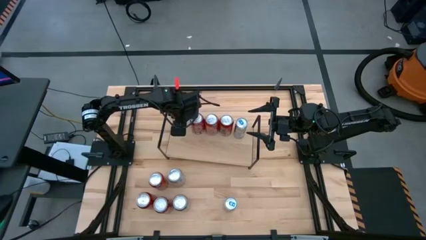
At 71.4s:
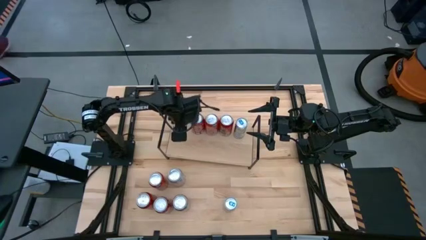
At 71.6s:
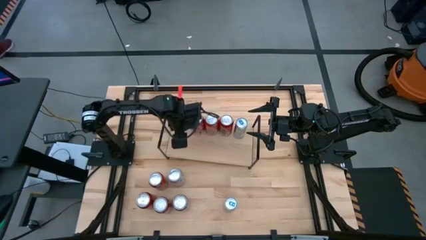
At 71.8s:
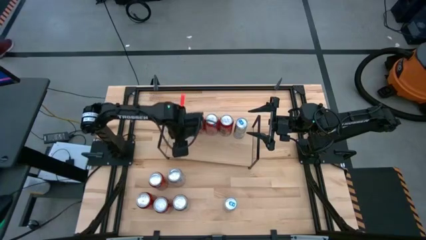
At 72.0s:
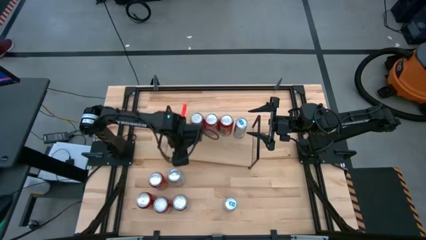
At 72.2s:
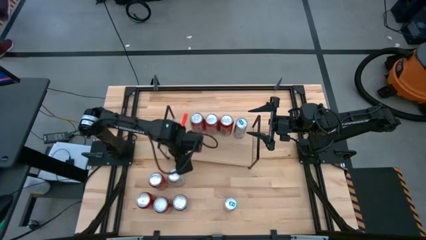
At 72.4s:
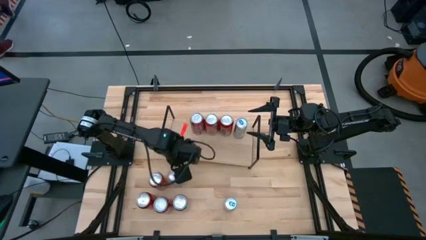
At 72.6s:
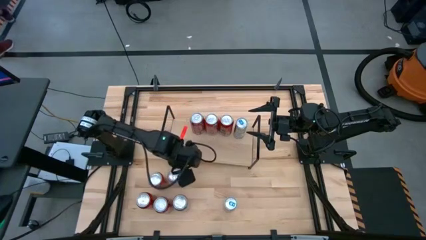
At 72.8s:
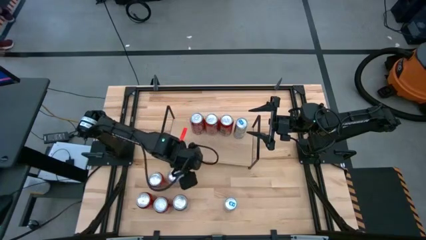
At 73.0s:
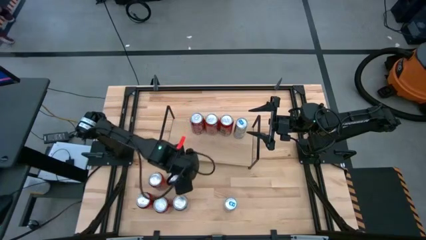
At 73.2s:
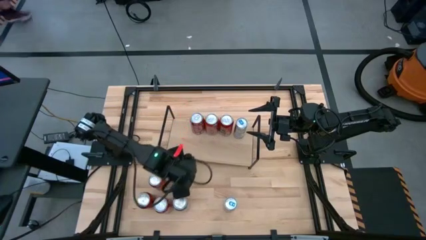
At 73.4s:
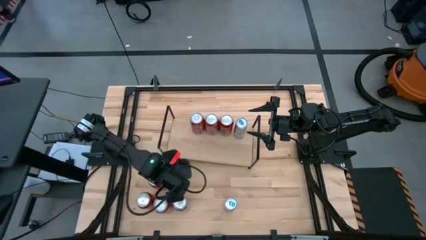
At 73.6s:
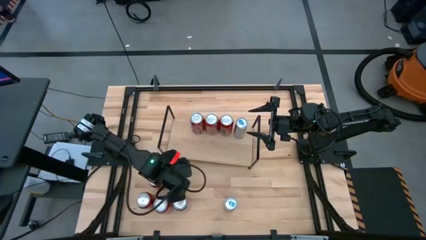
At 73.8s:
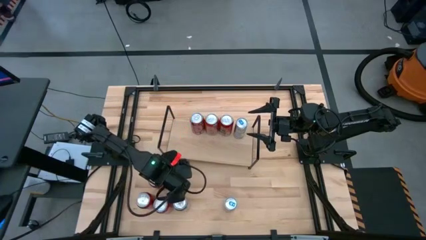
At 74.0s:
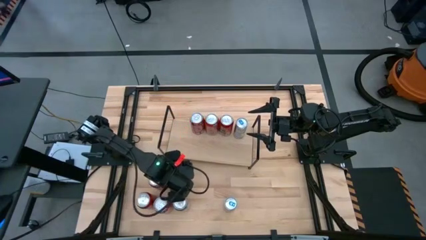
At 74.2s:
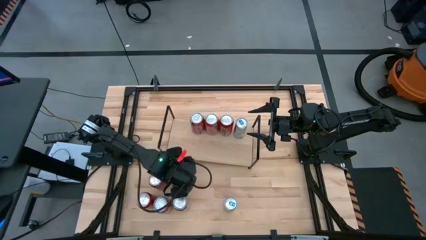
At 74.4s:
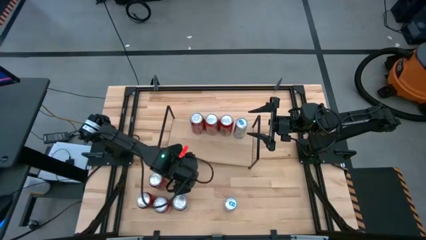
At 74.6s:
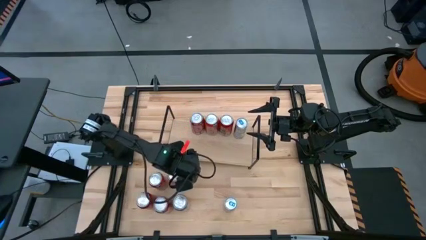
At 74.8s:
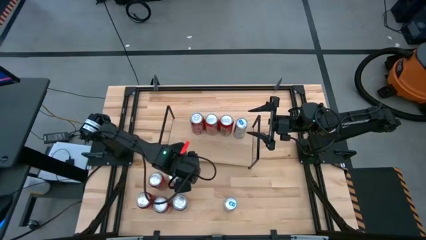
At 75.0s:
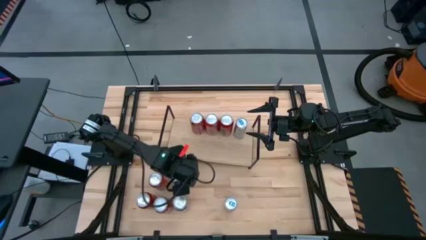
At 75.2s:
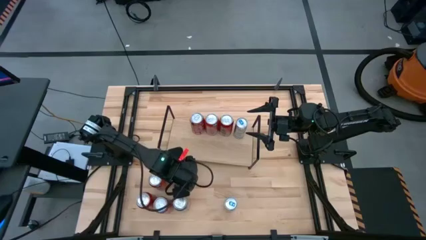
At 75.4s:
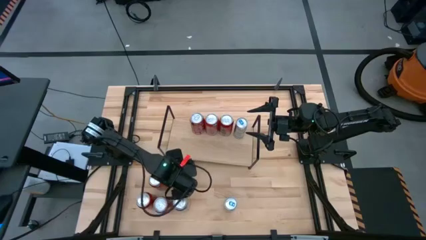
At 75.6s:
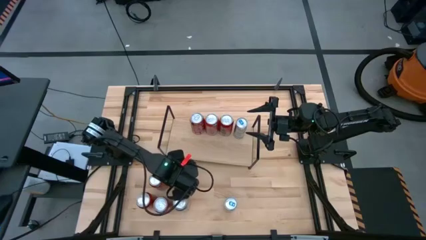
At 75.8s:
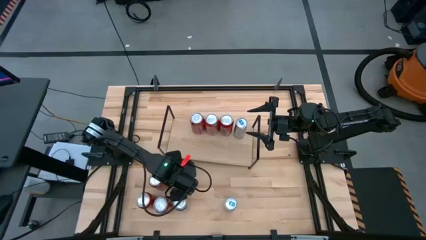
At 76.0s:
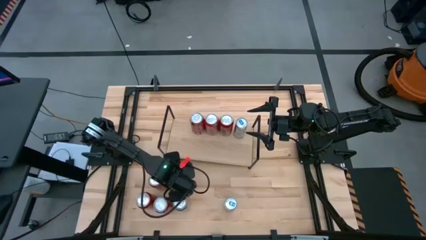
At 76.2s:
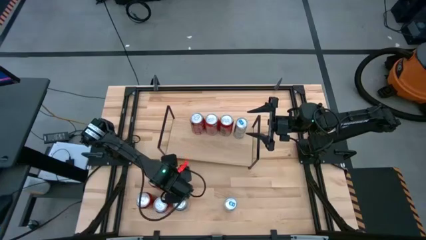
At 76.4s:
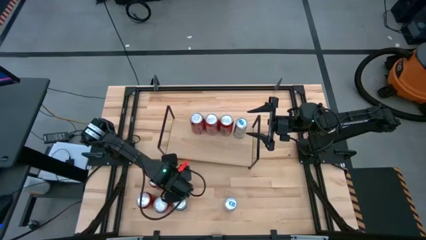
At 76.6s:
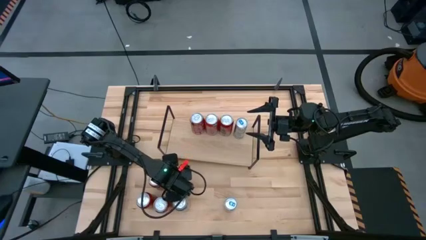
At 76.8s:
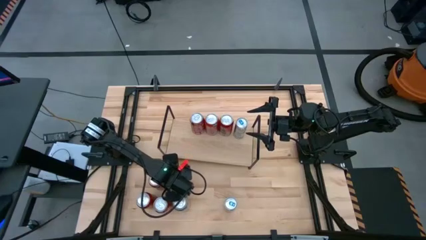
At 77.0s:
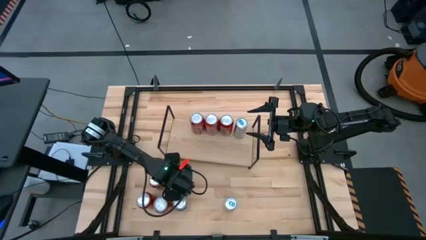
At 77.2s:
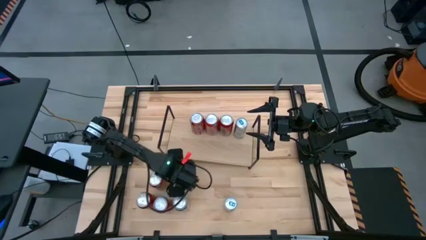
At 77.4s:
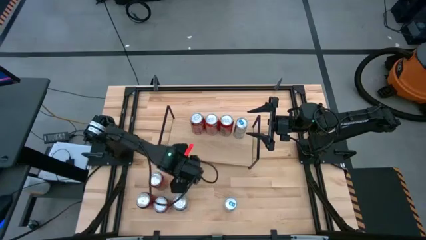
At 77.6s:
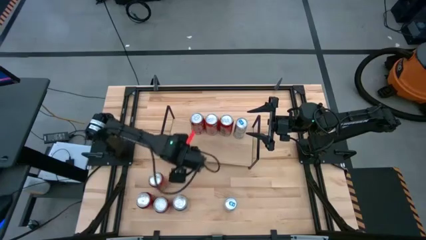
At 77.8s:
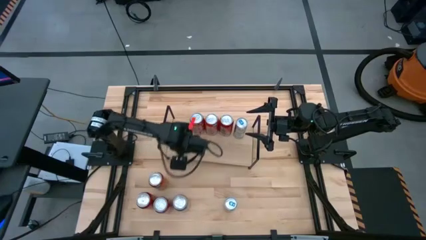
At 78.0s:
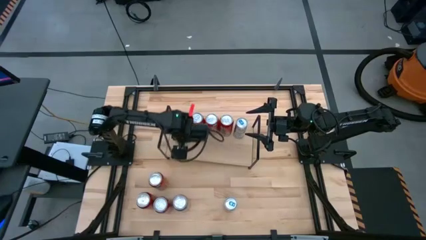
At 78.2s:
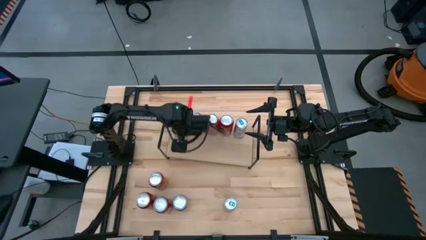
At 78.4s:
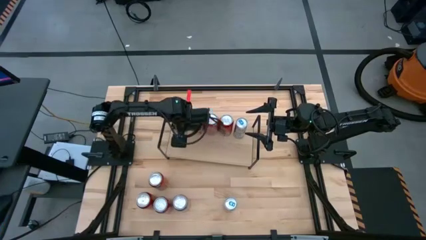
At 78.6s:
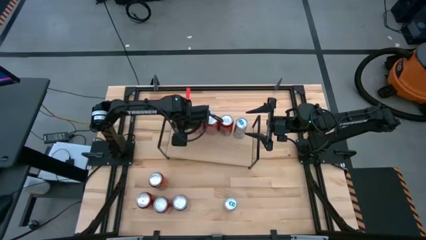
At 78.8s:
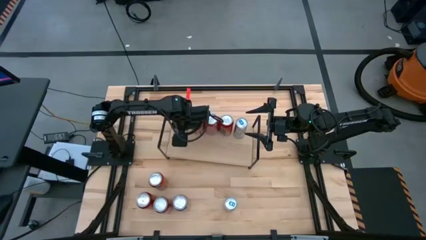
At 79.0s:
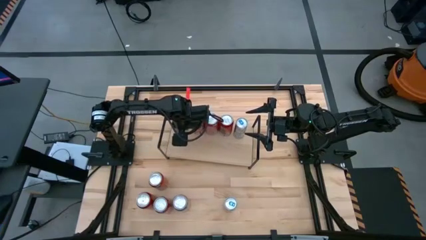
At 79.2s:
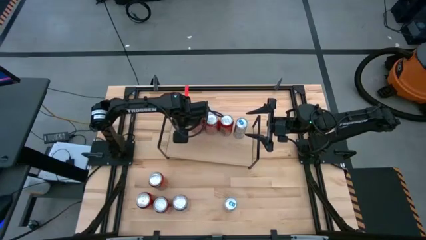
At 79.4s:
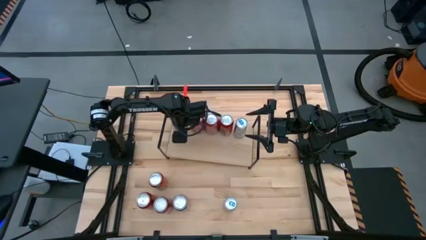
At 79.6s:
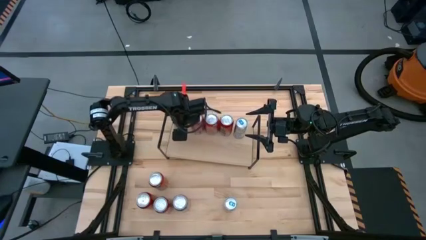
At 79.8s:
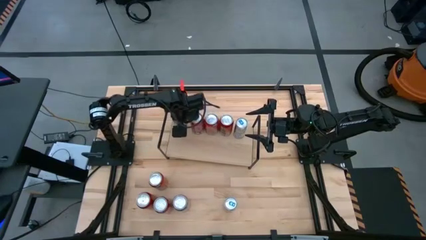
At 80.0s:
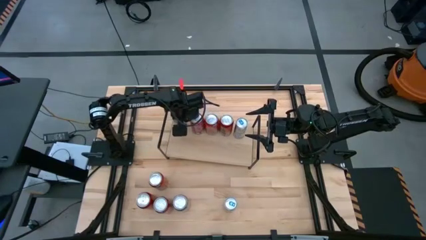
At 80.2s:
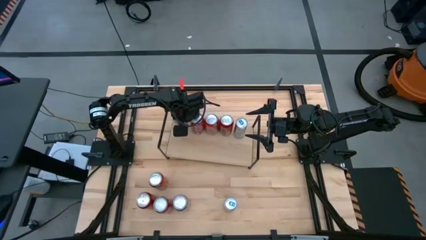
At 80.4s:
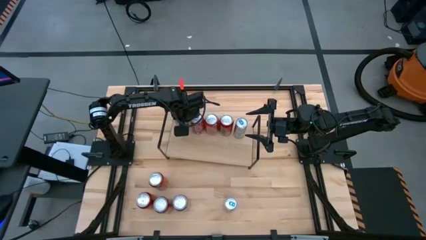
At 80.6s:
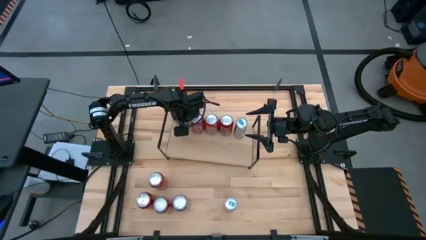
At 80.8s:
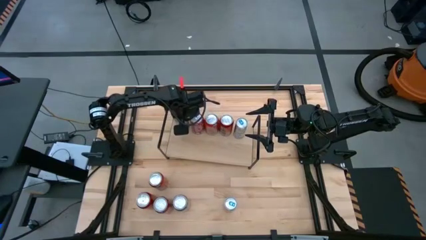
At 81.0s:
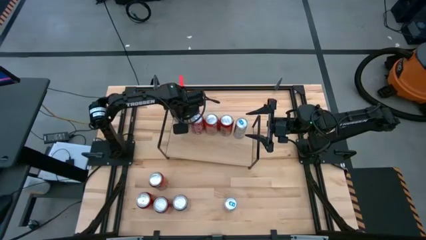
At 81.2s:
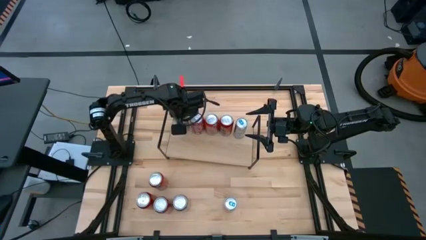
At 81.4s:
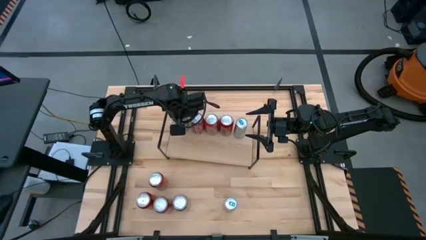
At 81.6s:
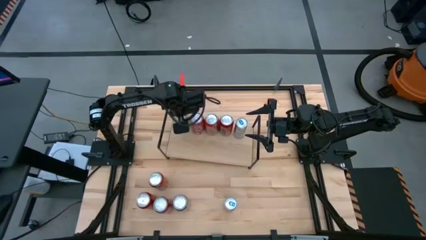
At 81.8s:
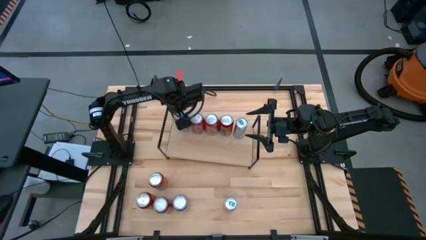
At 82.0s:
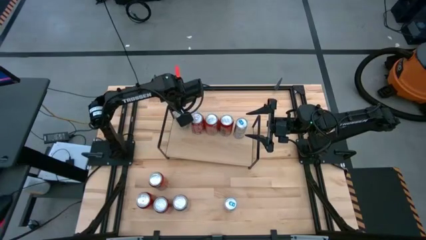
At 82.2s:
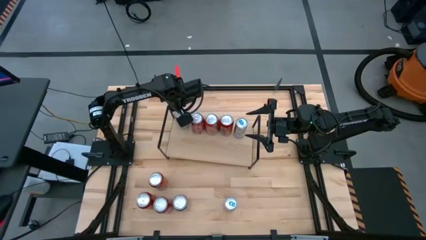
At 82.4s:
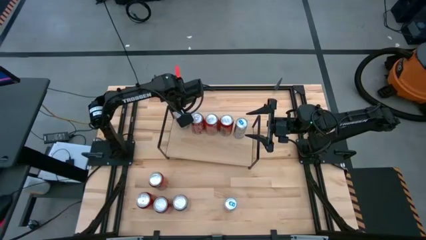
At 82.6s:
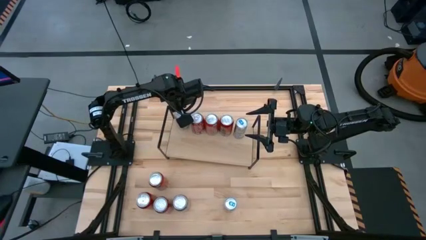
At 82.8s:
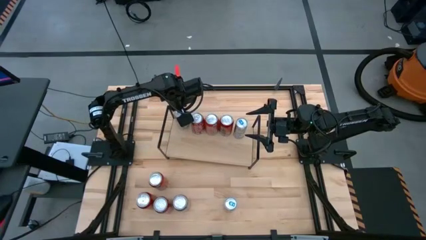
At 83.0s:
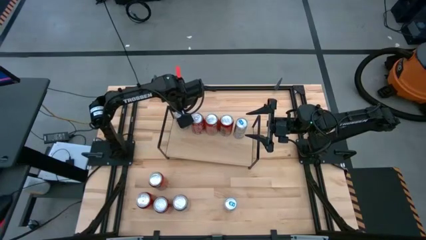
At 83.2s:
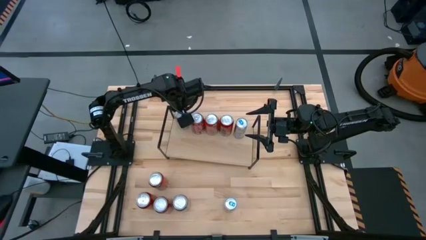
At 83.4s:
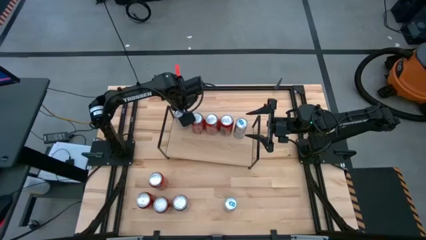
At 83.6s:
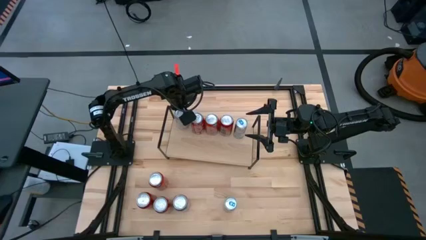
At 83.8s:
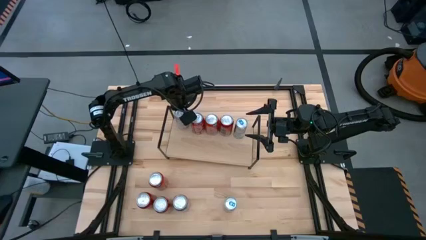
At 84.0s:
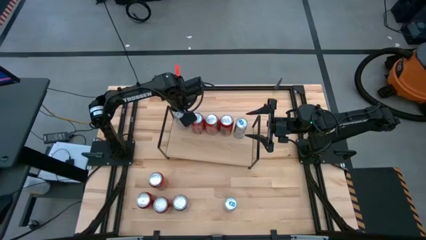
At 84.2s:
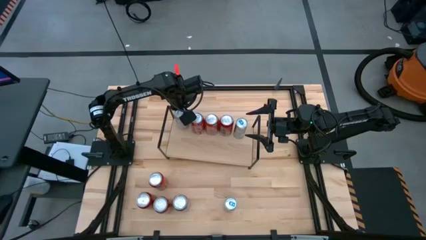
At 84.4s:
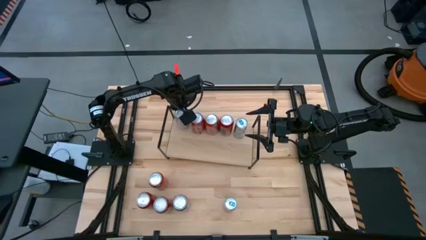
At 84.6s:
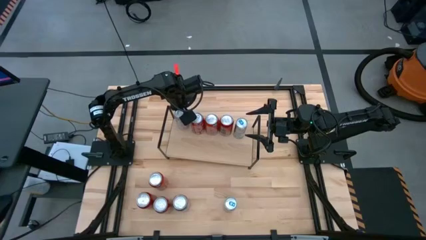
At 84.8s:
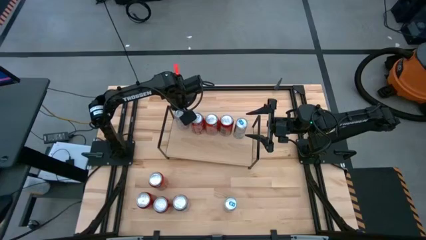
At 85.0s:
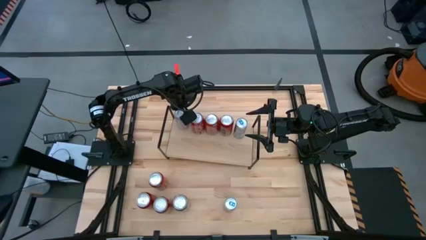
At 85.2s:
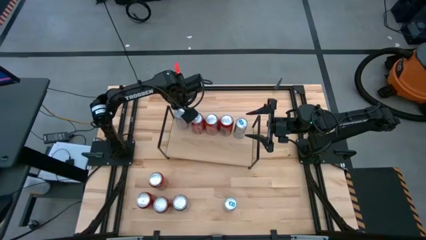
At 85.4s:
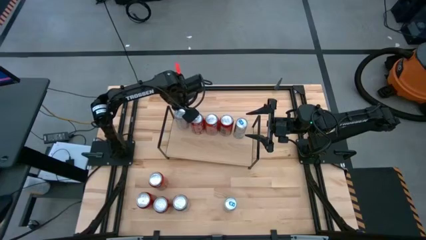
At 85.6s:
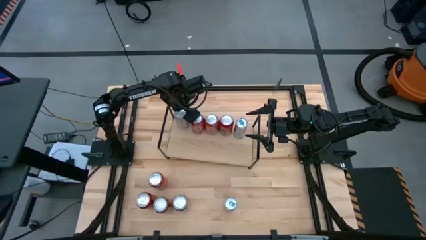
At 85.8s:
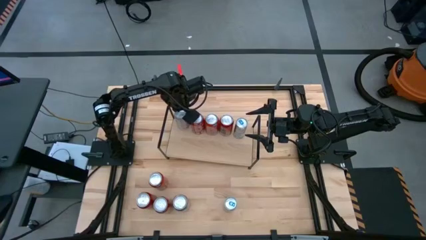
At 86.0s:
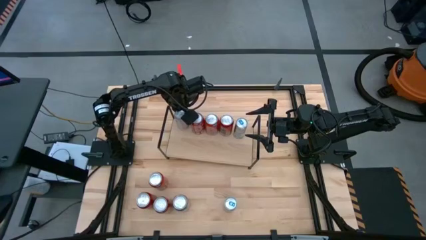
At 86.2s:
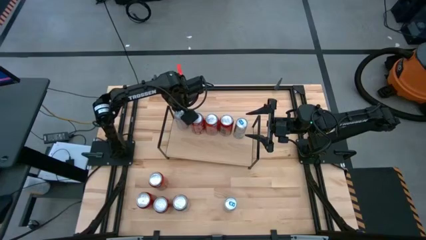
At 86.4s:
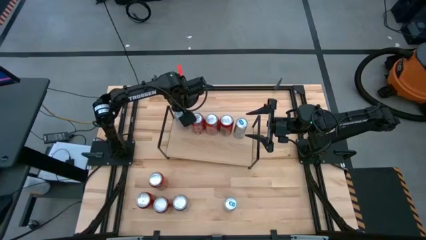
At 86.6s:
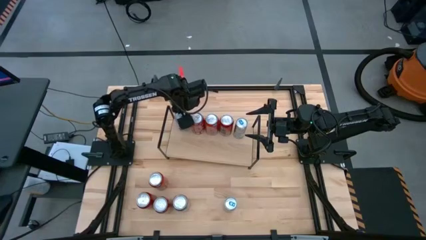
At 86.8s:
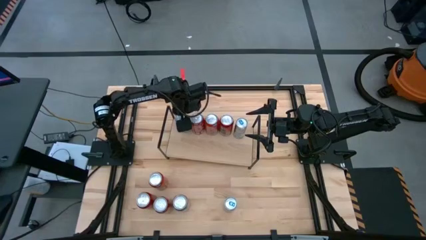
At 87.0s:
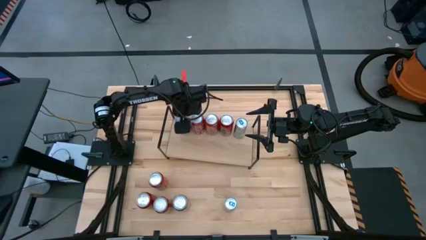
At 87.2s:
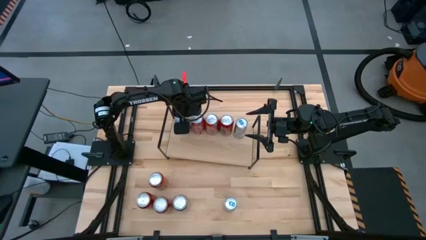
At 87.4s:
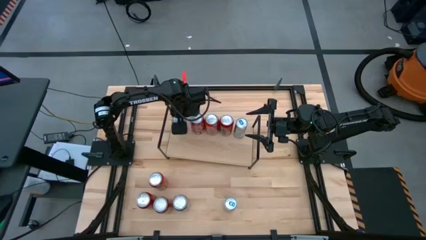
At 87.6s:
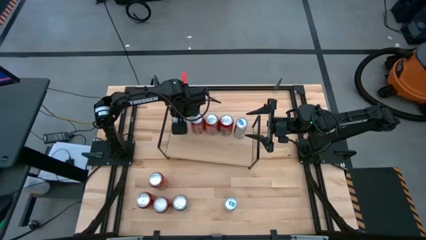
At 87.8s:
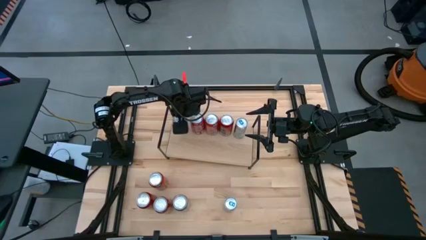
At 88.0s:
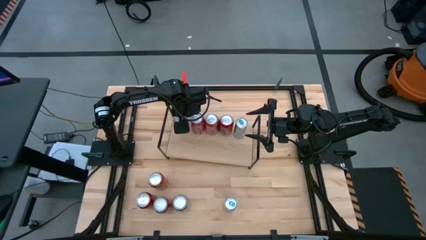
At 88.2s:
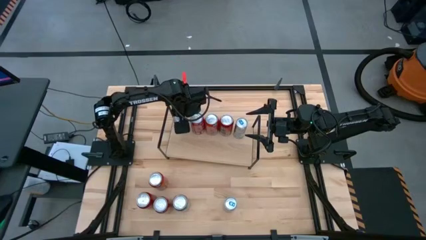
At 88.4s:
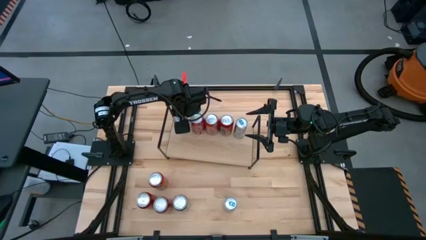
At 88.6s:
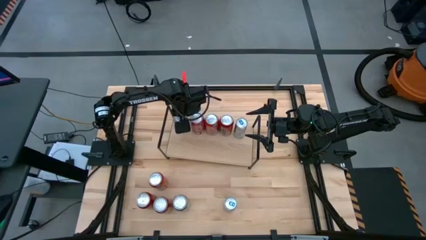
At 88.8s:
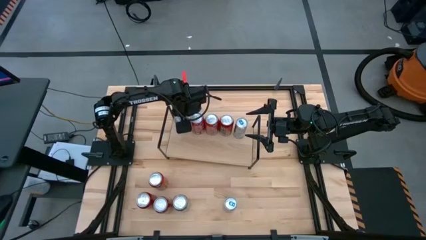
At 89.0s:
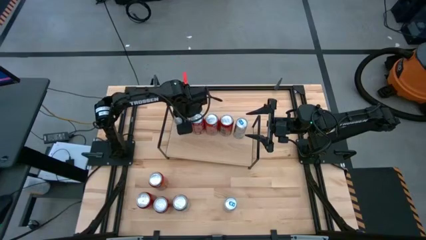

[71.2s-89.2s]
Task: Place canned beverage on shelf
Put the top red-silver soda can on the shelf
